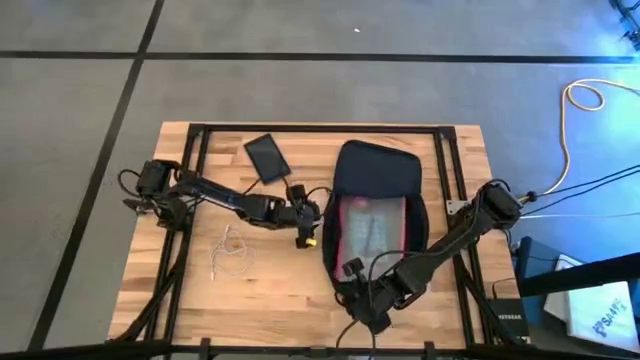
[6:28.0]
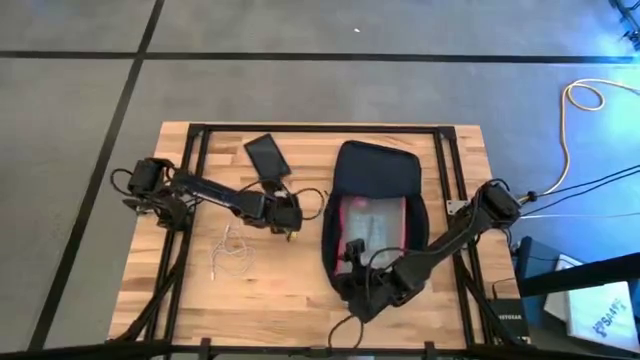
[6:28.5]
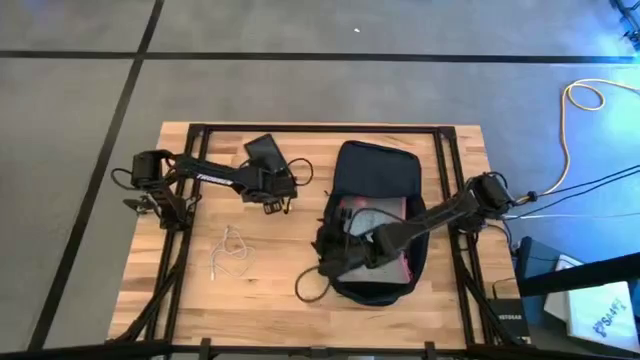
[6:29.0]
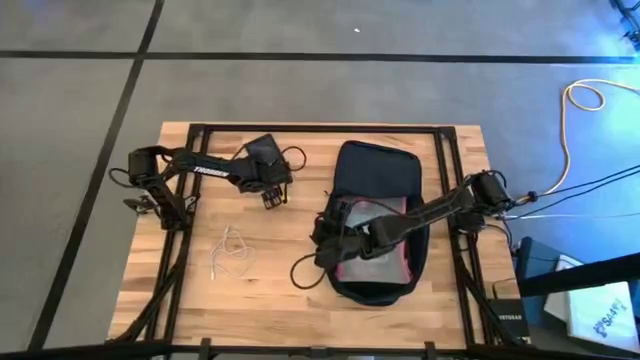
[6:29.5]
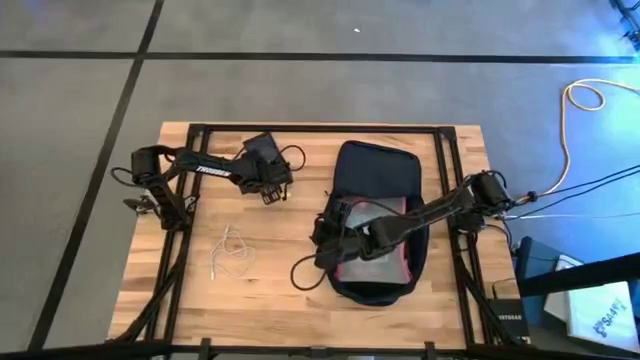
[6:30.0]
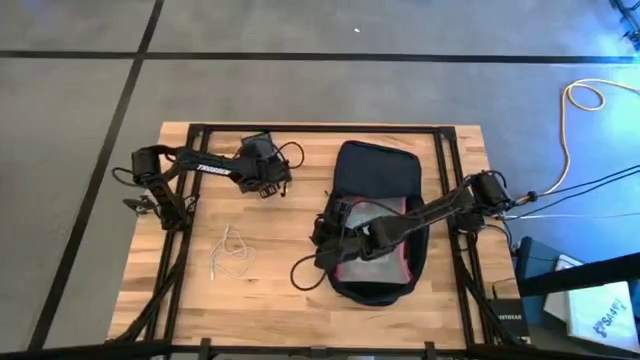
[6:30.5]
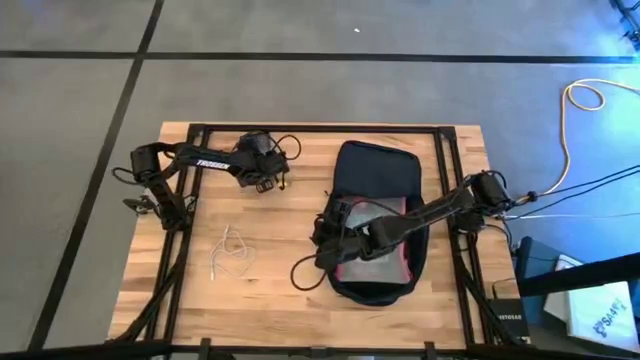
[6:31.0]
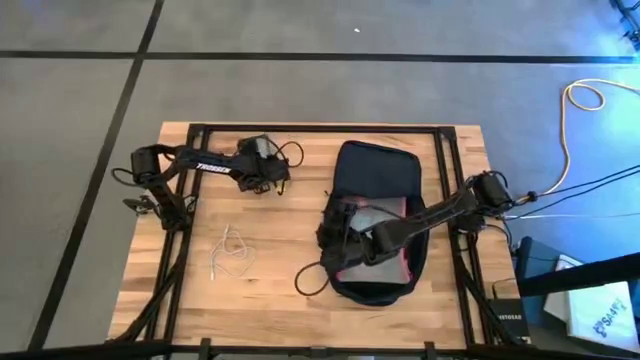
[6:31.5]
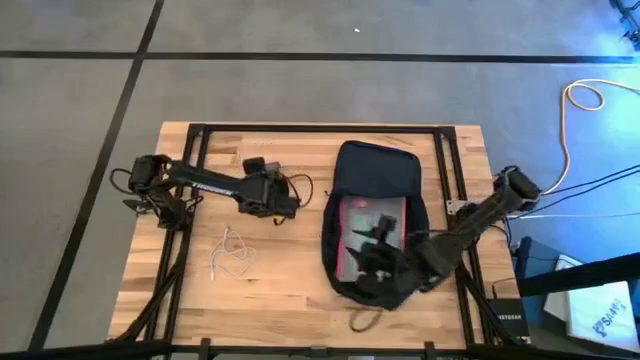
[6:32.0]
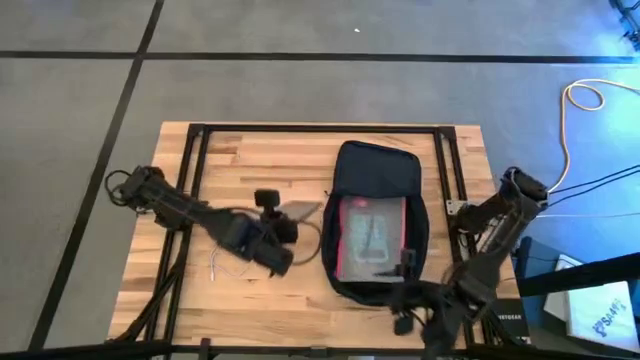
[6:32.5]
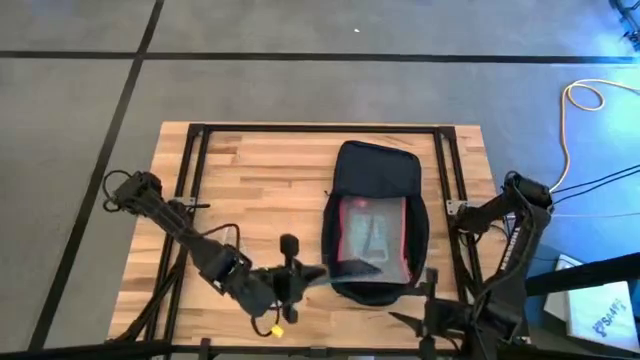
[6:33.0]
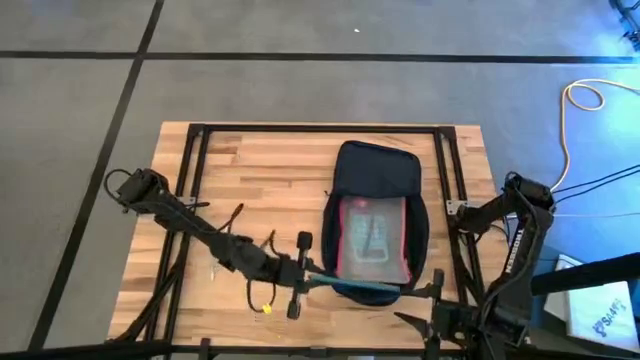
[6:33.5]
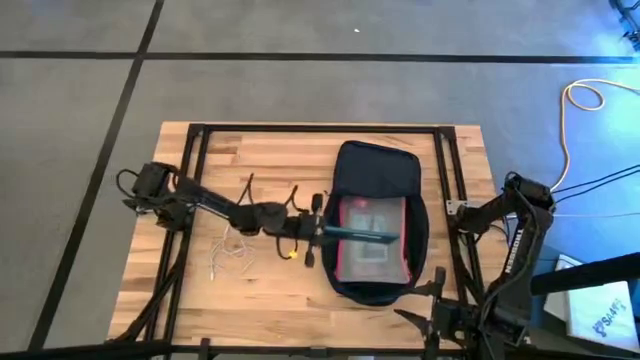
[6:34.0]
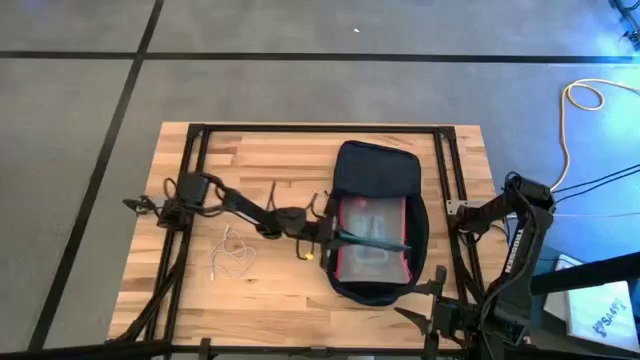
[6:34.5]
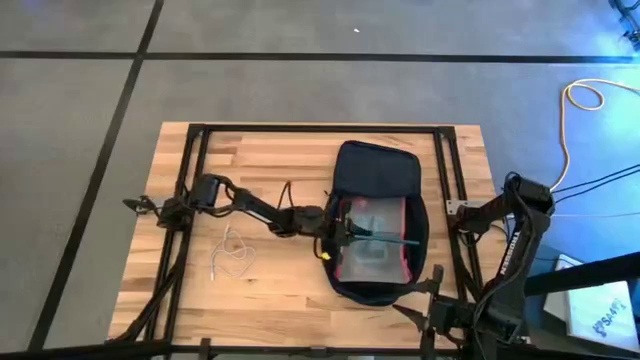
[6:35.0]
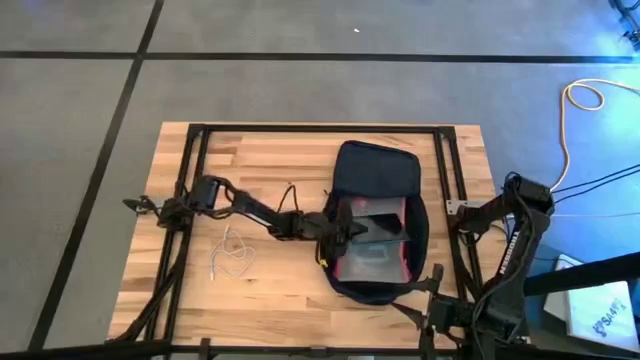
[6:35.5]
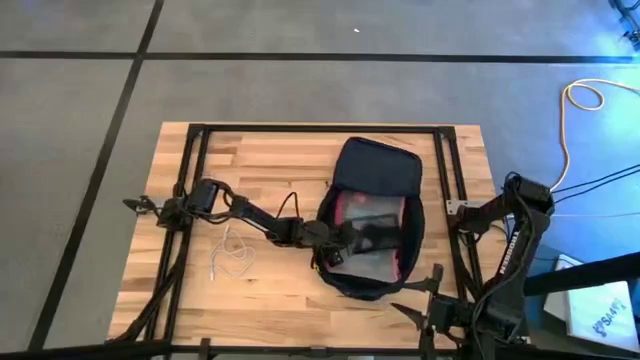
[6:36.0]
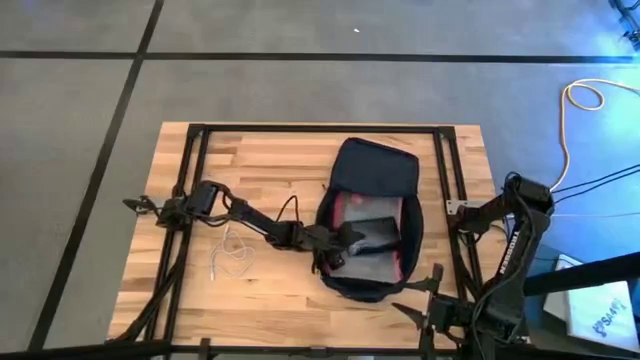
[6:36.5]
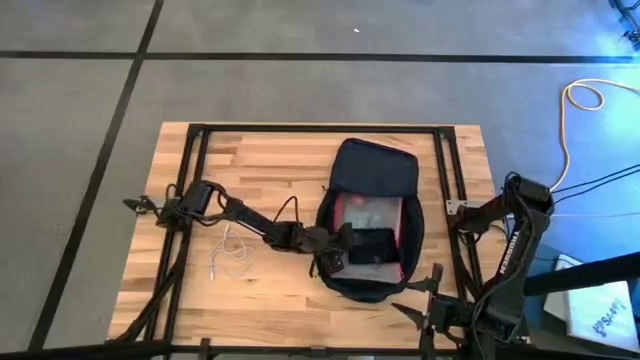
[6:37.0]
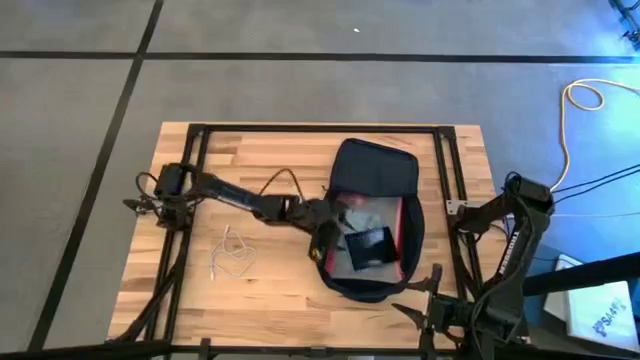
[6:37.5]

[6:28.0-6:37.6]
Task: Unpack backpack
Put the blue tablet into the blue backpack

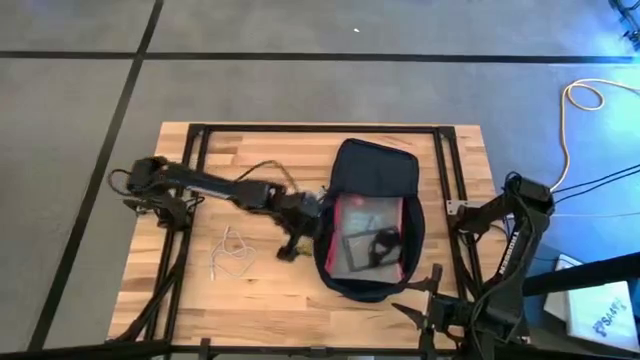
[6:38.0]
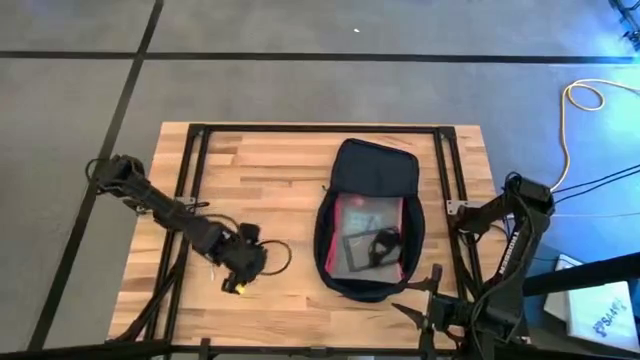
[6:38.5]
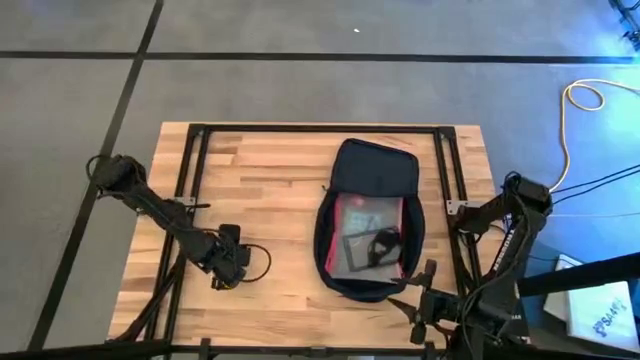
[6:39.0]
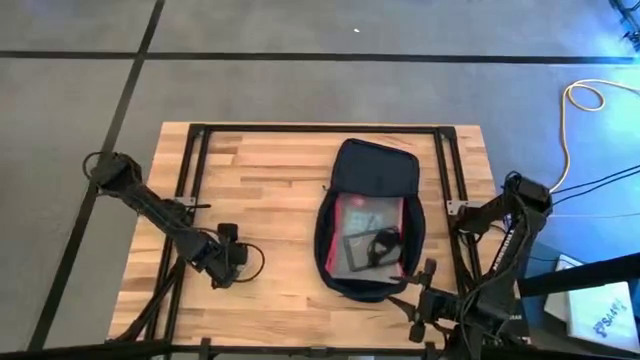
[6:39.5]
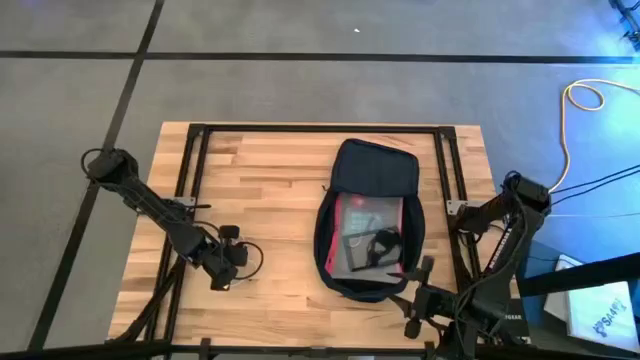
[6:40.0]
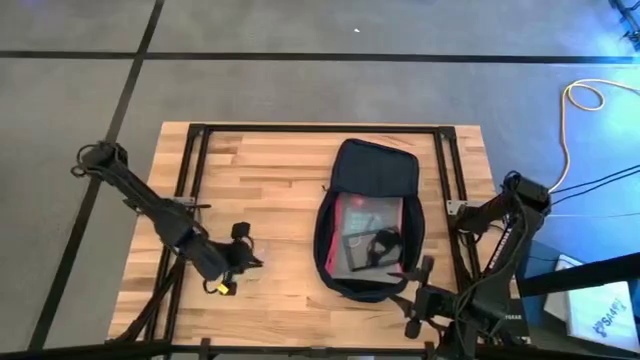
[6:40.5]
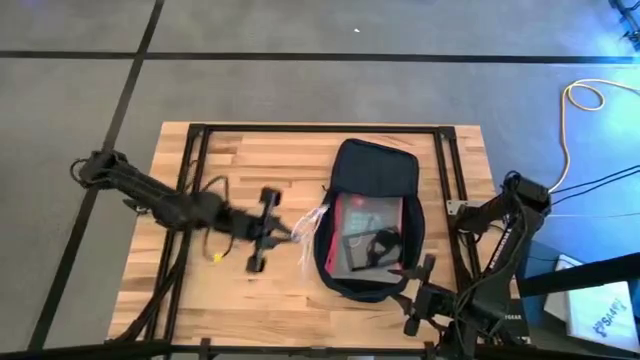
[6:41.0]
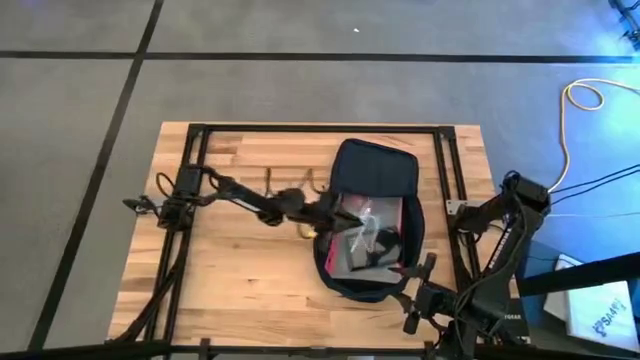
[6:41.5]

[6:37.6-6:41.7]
Put the white charger cable into the blue backpack

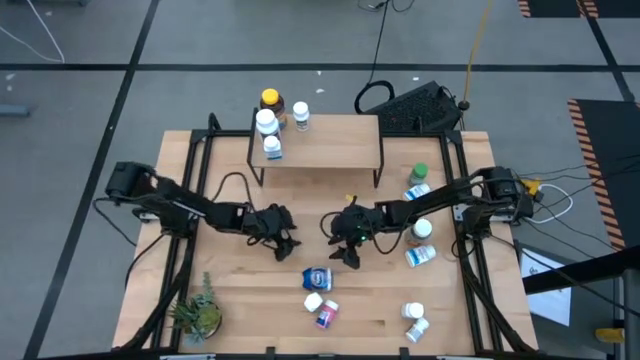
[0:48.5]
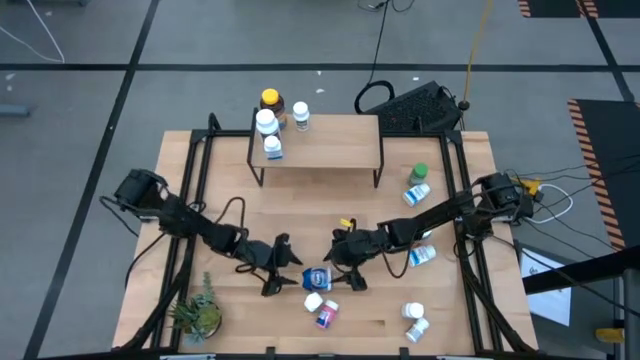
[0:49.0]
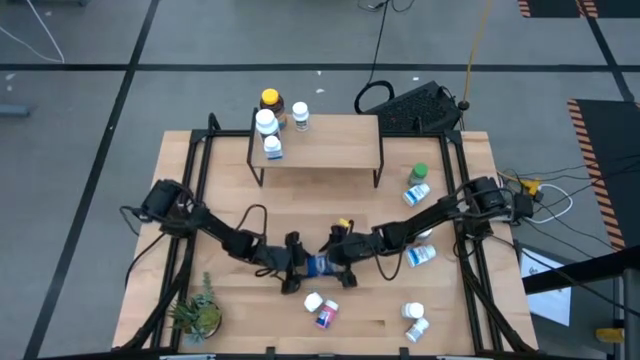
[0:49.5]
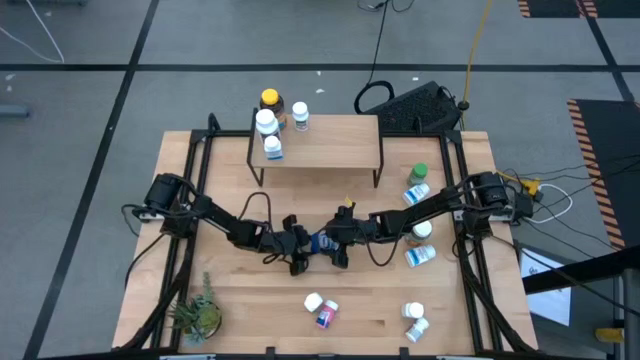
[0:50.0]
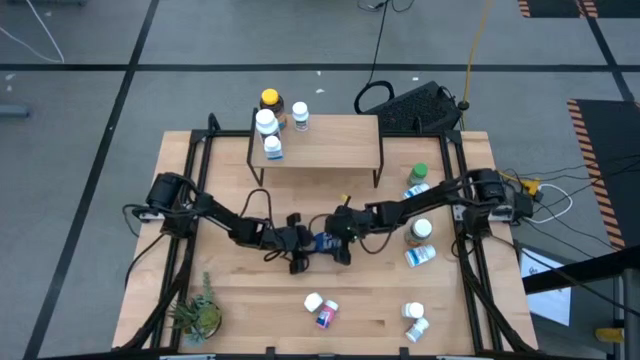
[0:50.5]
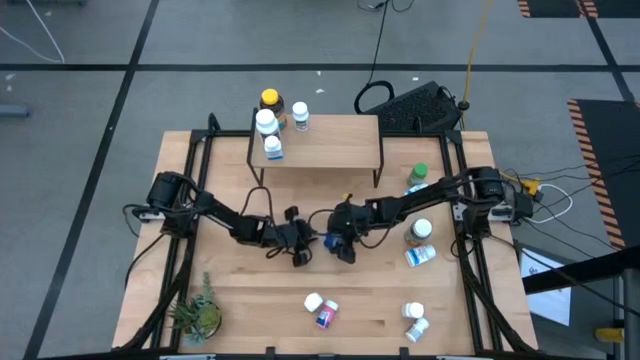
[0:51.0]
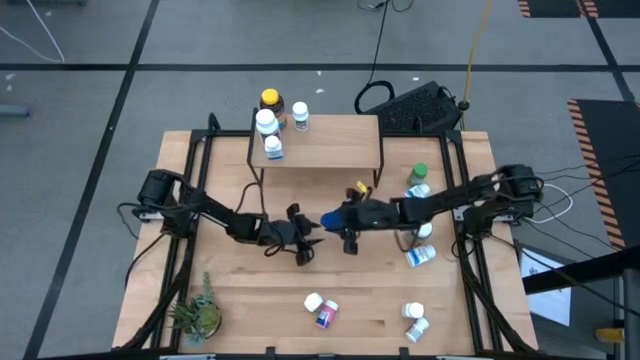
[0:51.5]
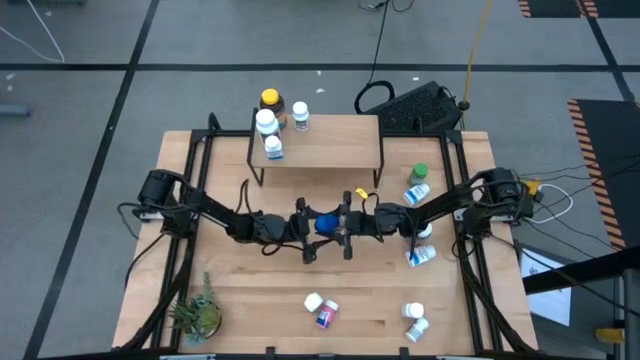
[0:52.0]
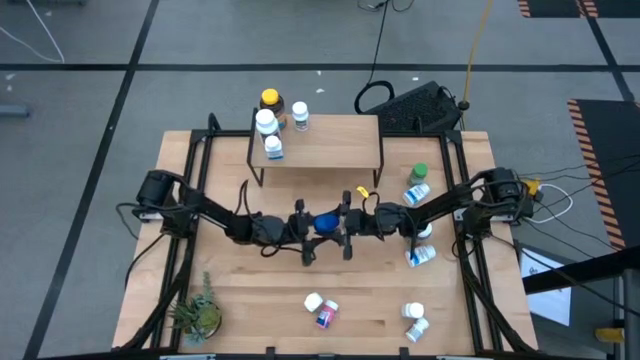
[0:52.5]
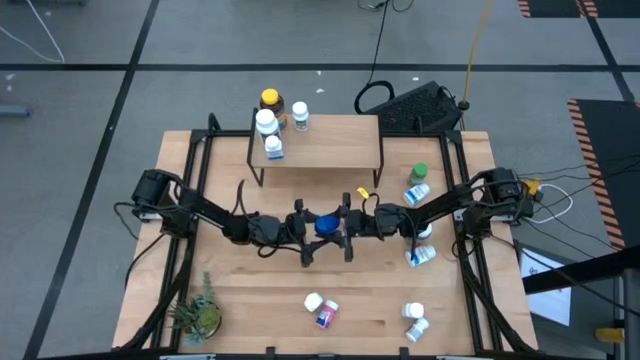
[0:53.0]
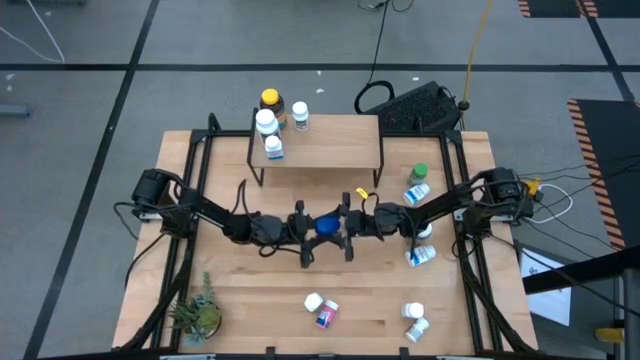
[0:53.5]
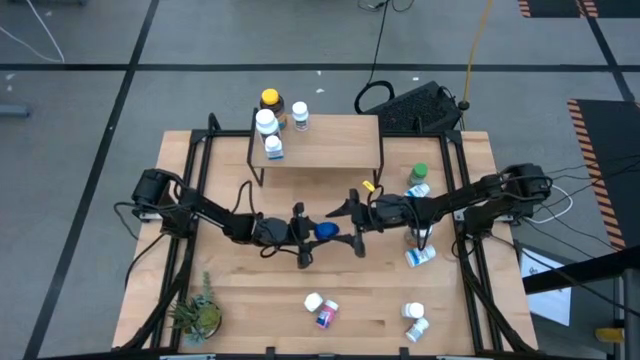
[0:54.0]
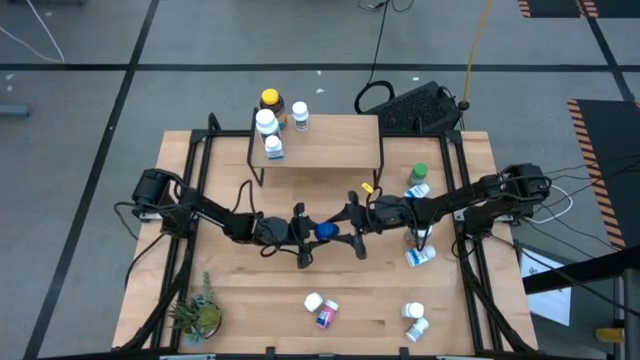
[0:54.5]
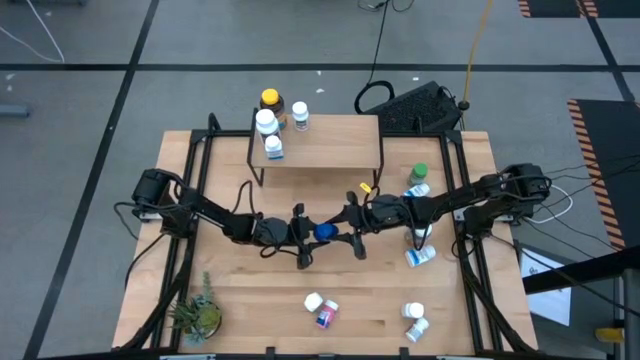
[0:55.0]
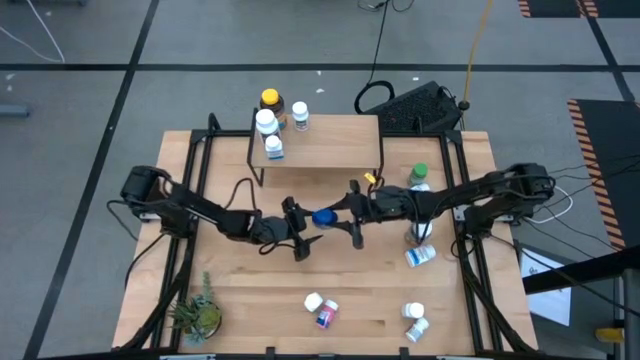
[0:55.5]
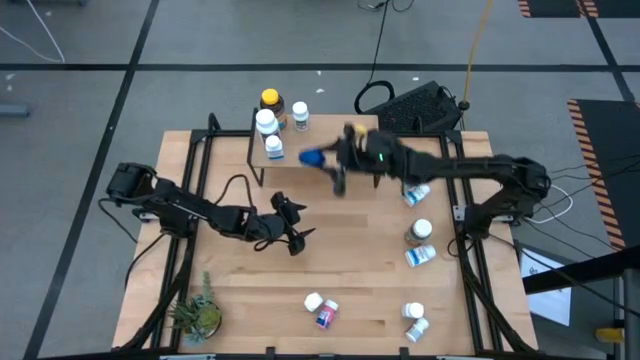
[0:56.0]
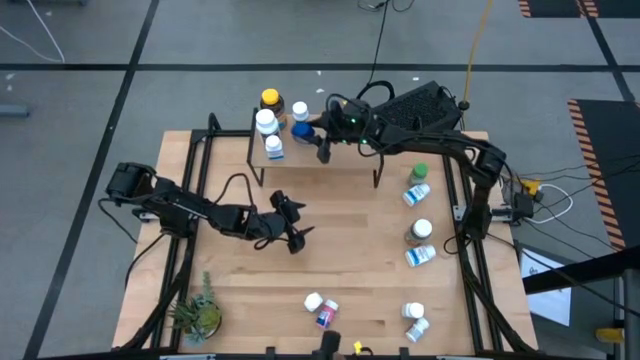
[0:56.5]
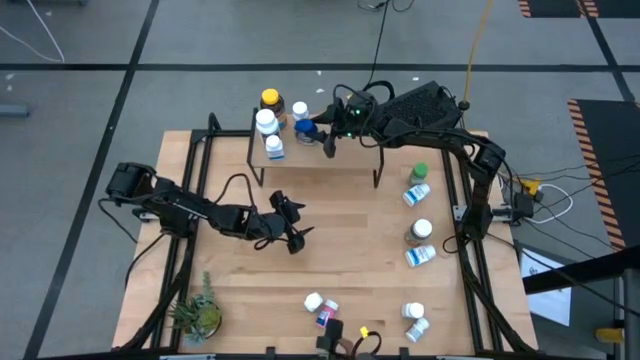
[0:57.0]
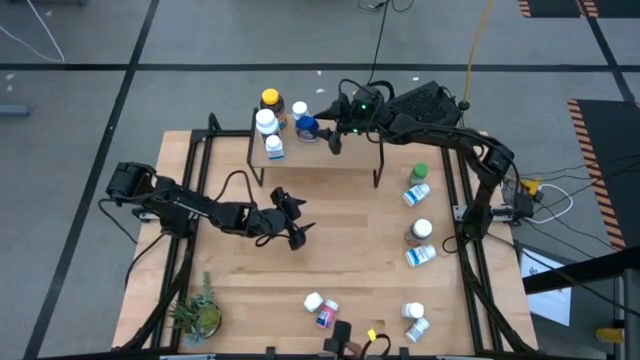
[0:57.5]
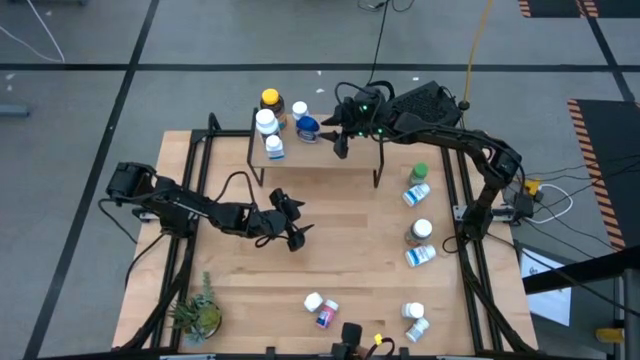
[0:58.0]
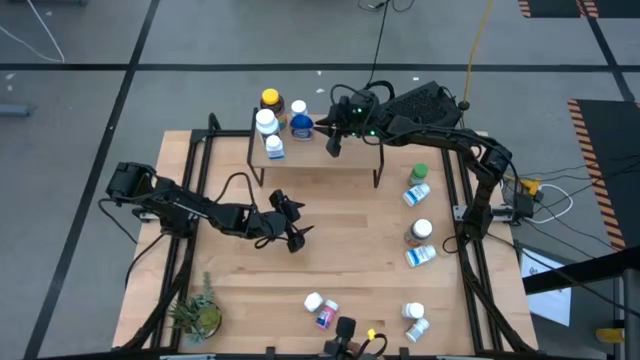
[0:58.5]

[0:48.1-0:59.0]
Task: Pick and place medicine bottles onto shelf by color
Put the blue medicine bottle on the shelf
